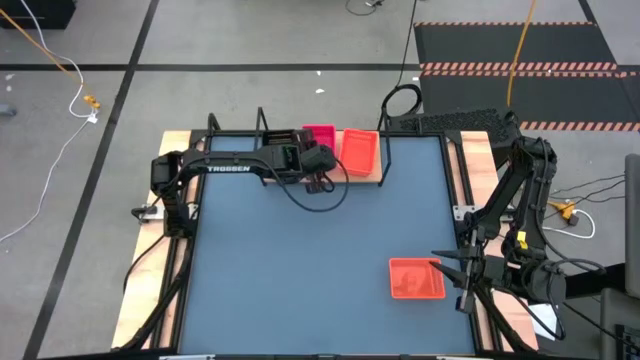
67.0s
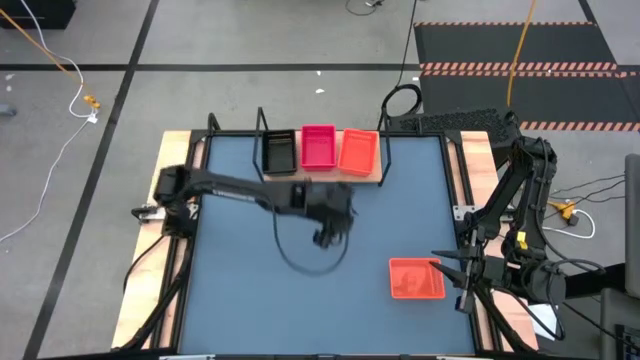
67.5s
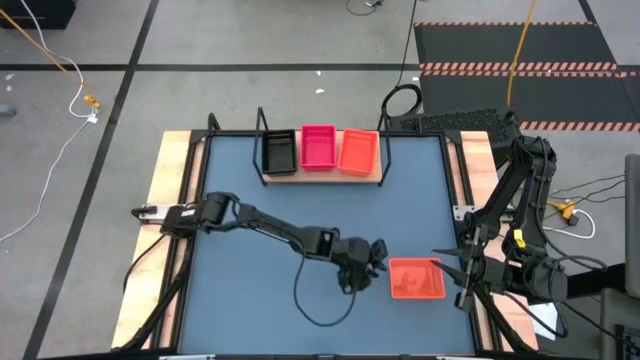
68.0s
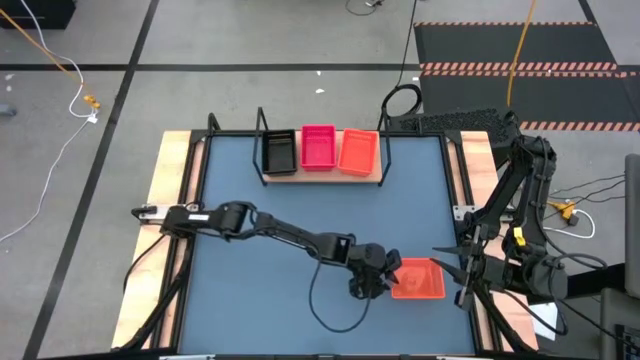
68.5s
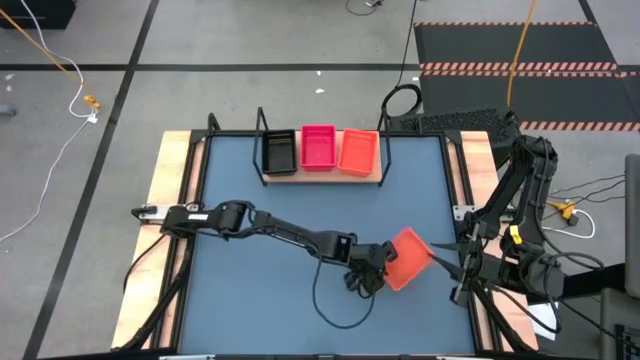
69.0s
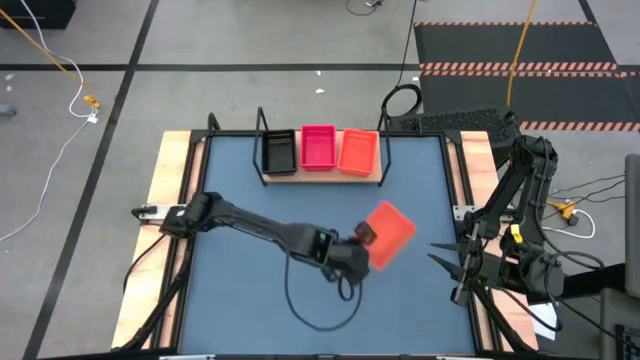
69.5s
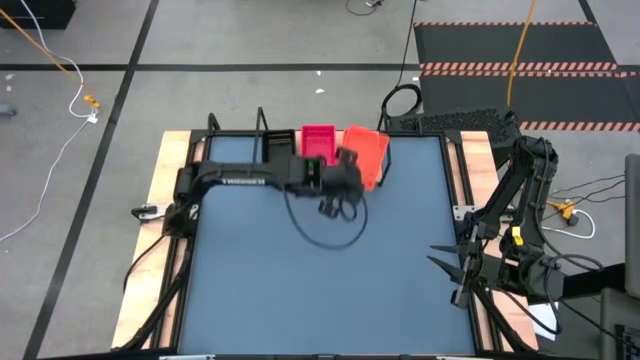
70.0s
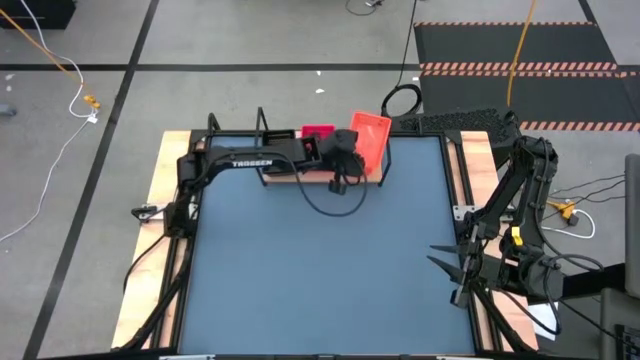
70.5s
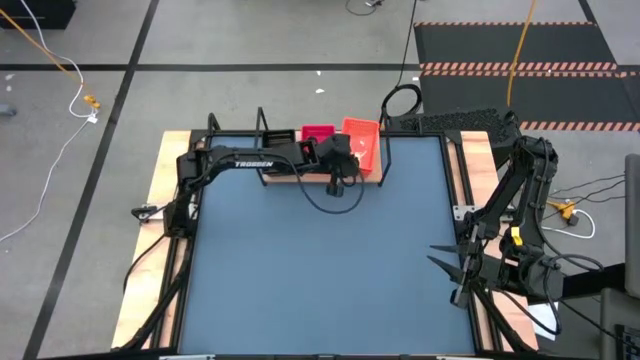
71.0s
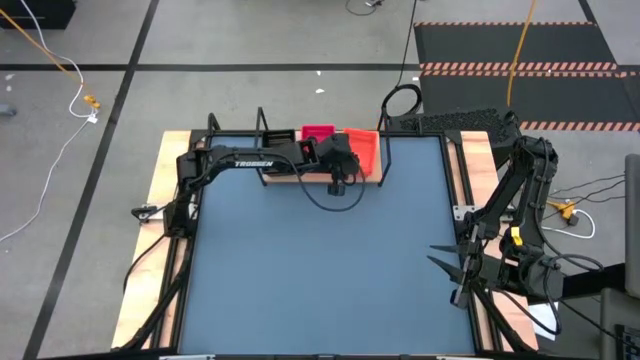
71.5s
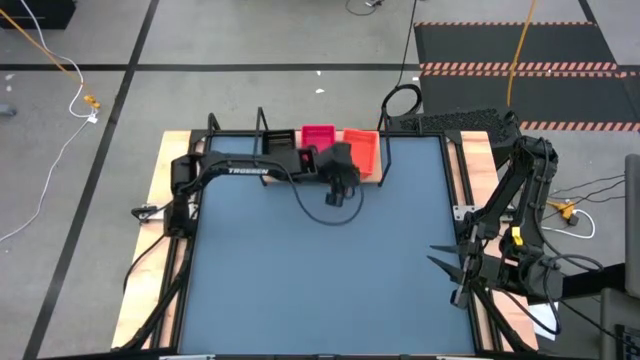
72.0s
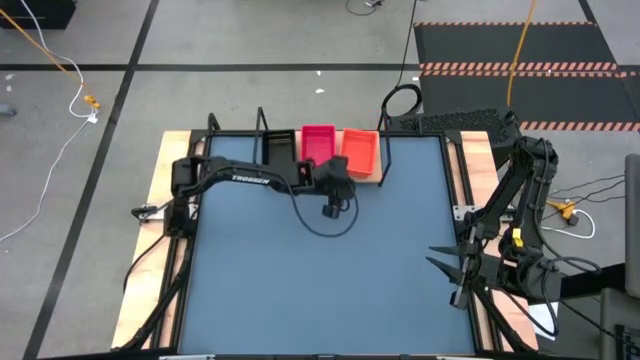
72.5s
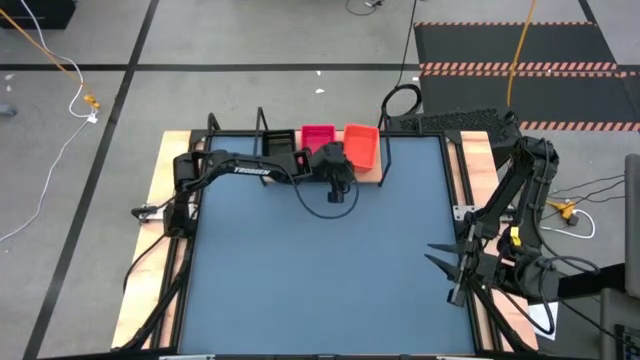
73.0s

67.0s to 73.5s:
Task: Stack baskets on shelf by color
Stack the orange basket on top of the orange basket on the shelf

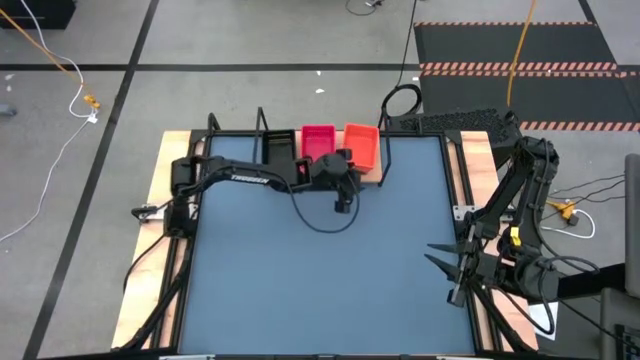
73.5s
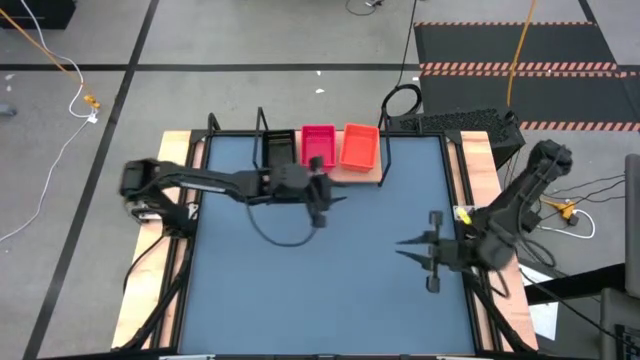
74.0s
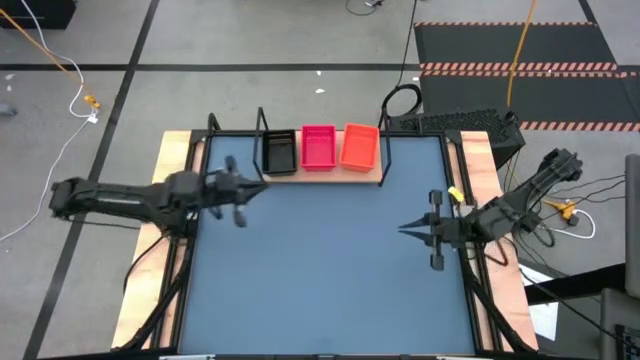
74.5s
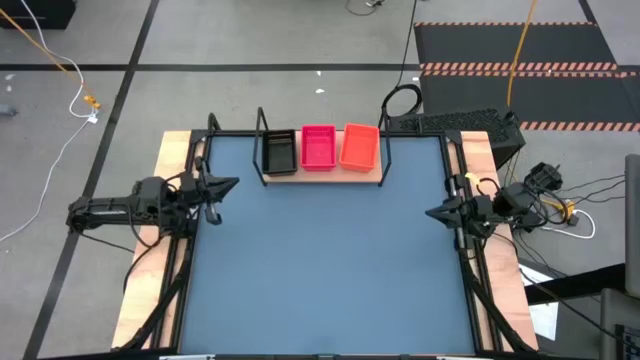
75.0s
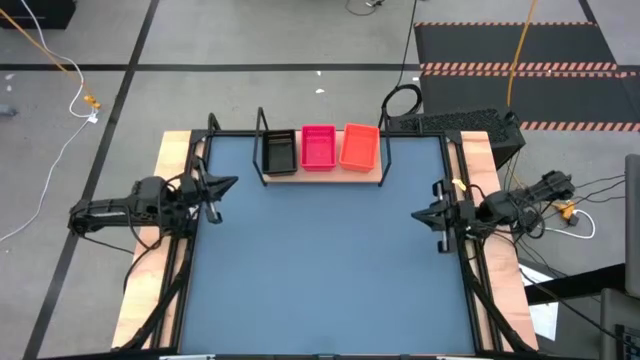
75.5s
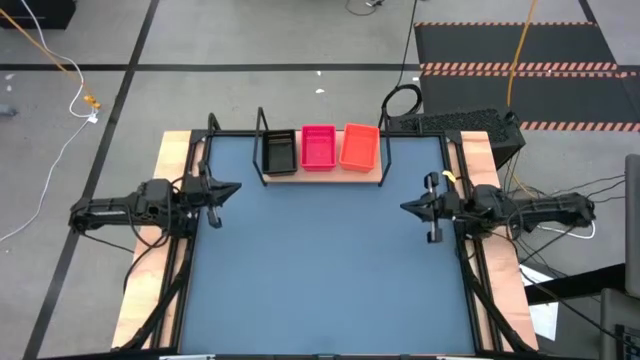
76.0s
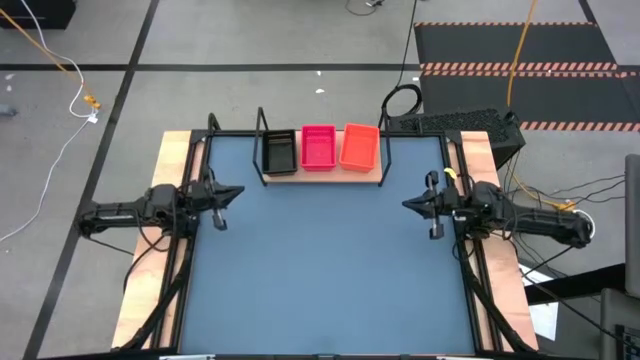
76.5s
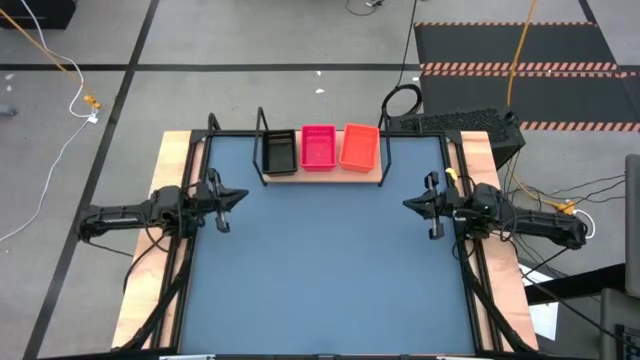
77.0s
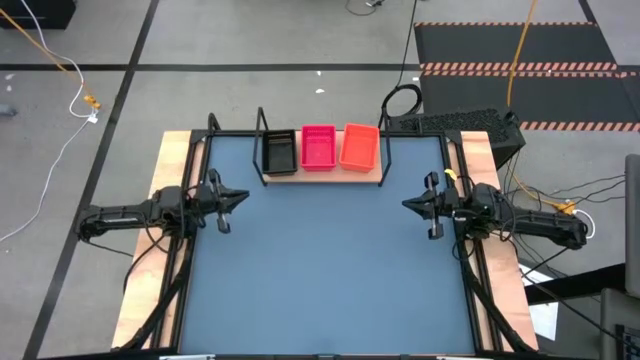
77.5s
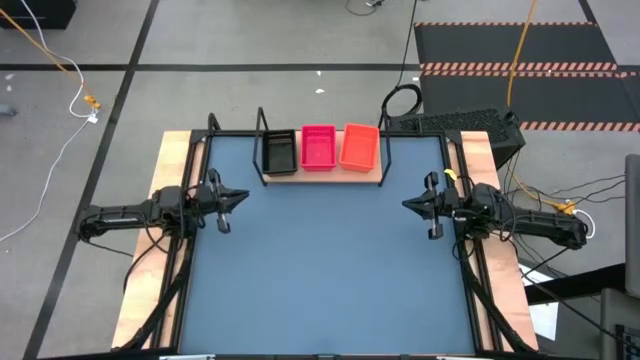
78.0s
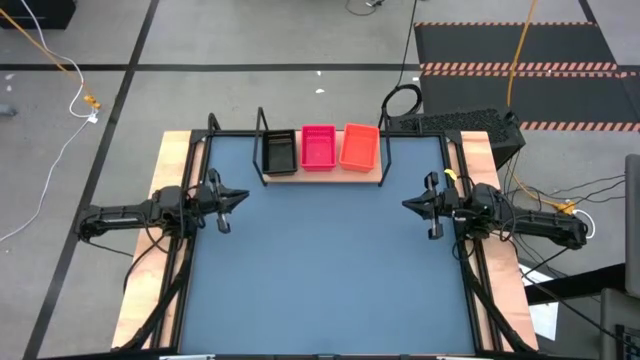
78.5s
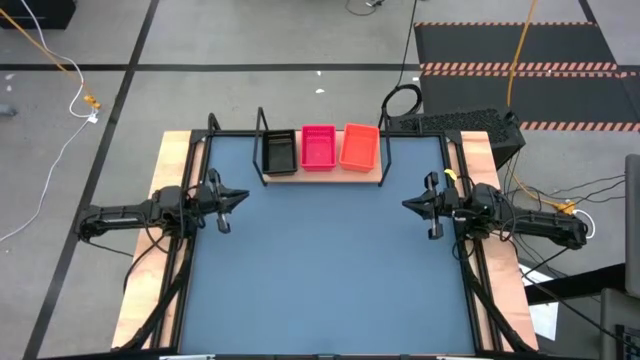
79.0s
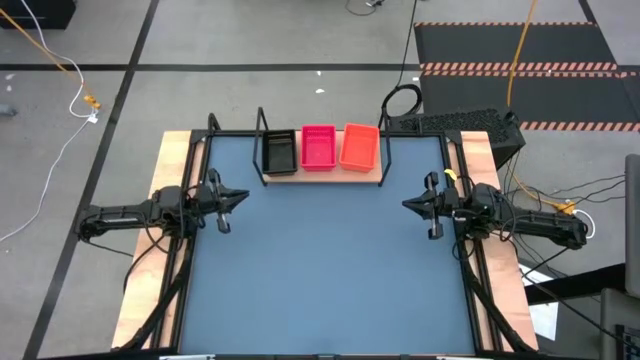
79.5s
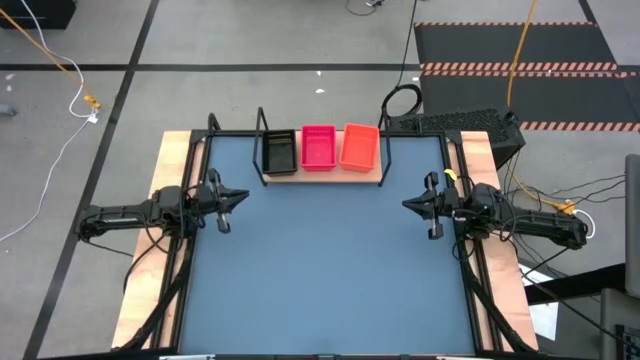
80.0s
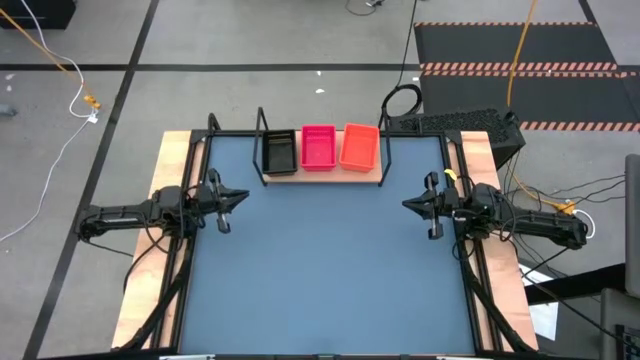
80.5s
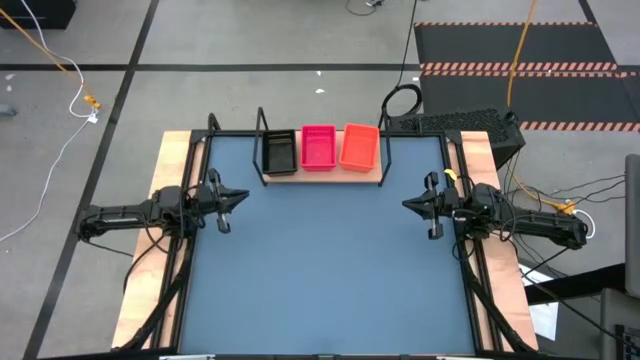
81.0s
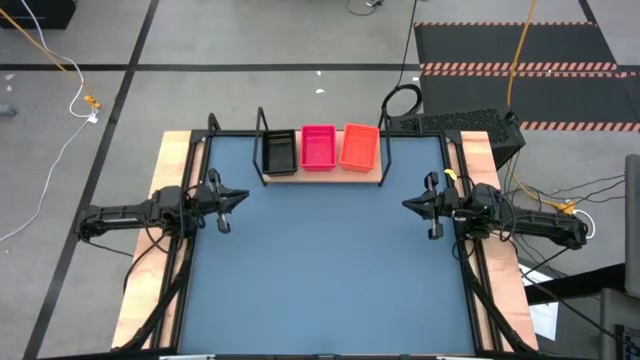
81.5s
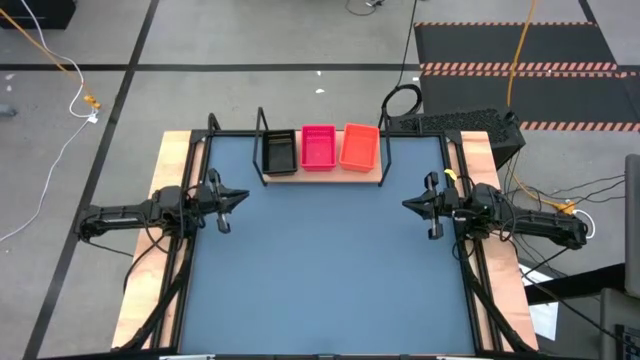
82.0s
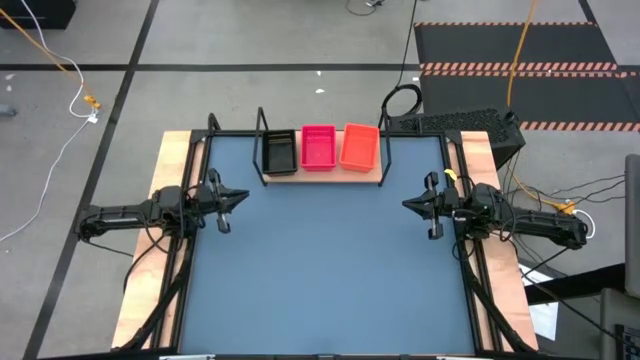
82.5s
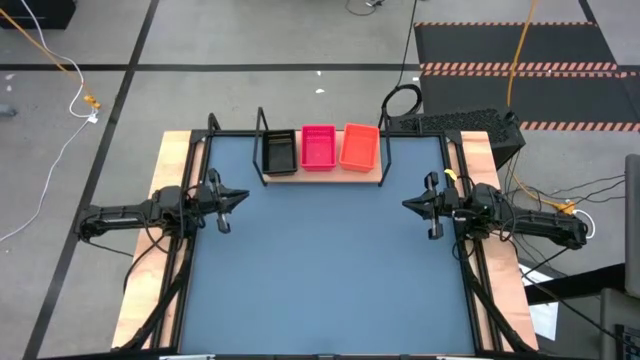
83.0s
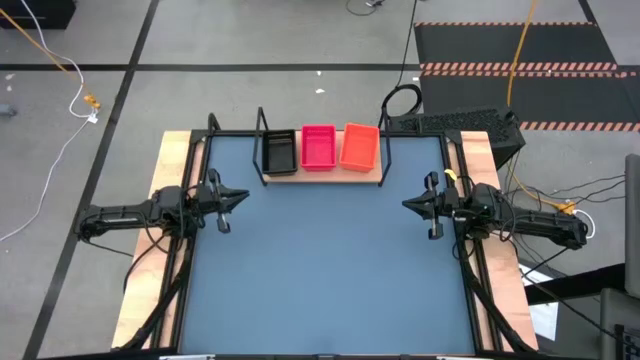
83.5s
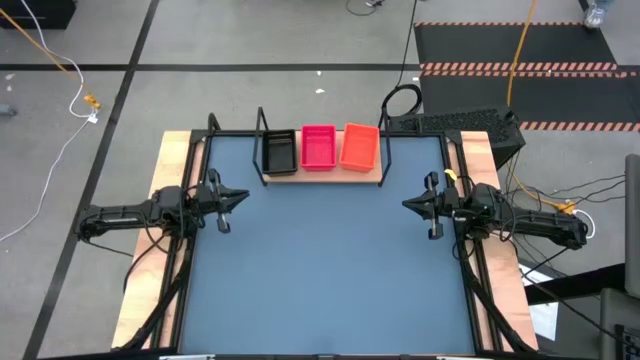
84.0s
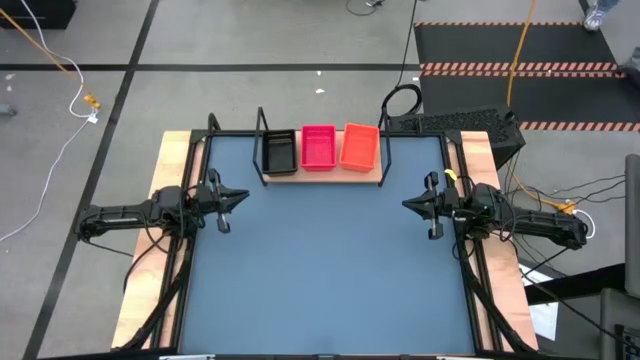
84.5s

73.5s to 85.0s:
Return to Home Position

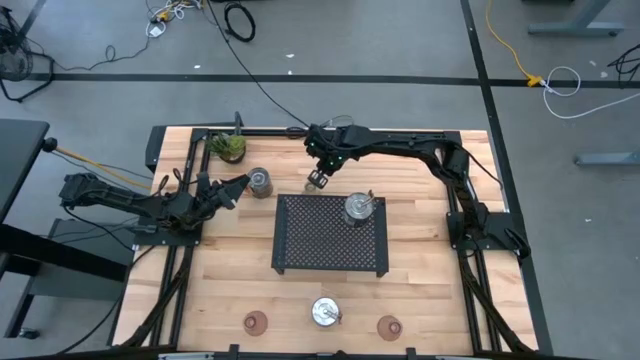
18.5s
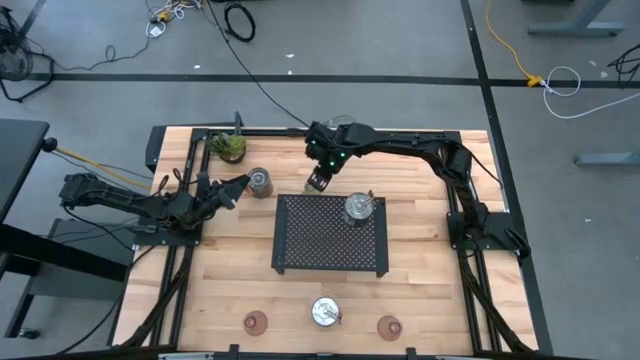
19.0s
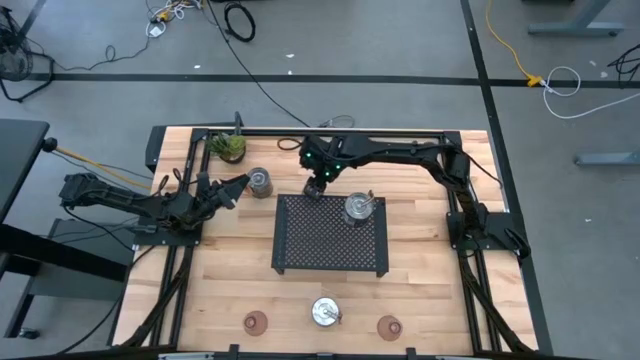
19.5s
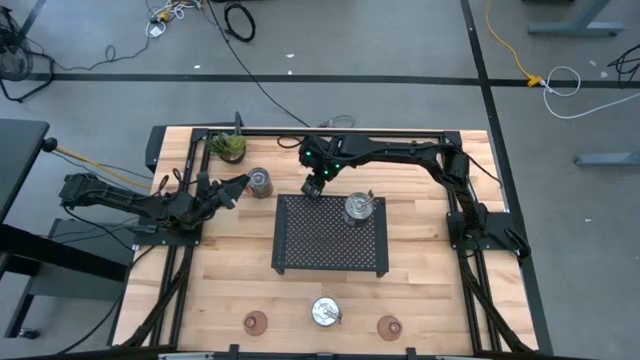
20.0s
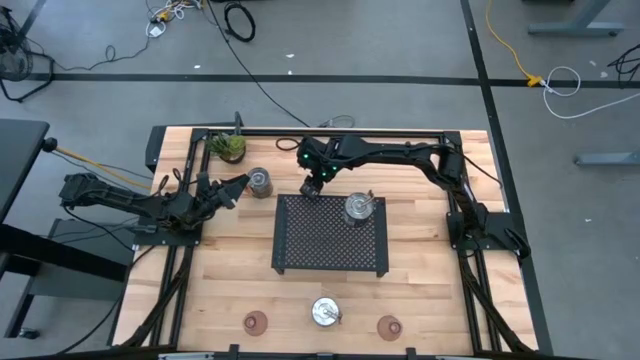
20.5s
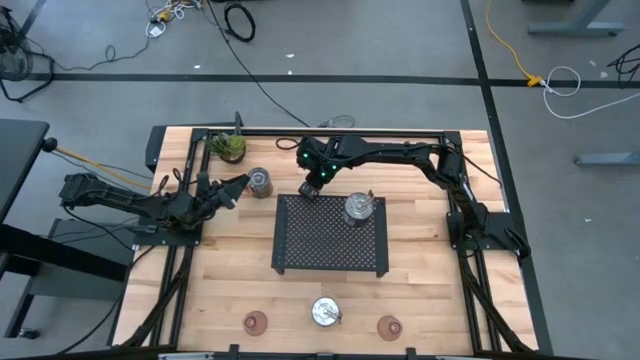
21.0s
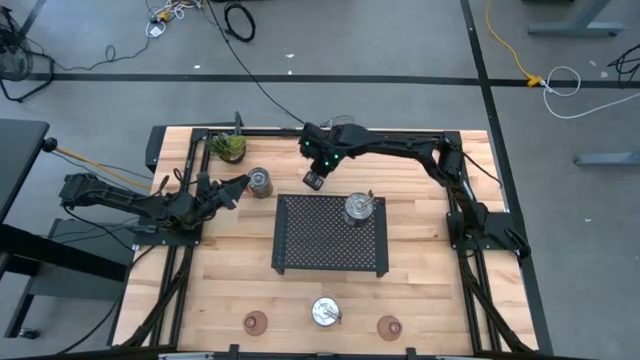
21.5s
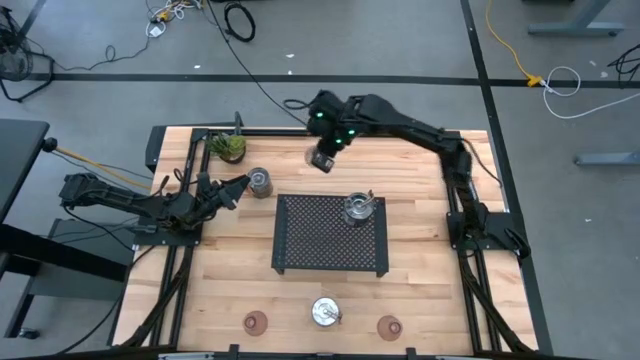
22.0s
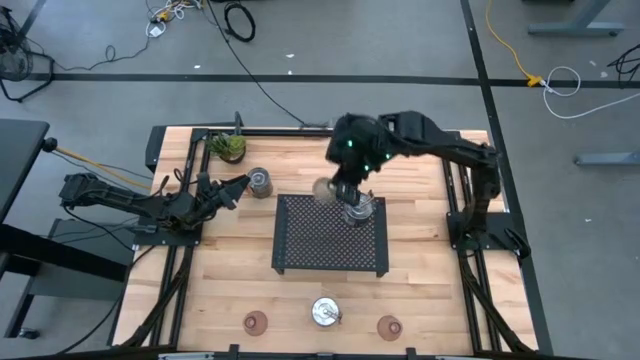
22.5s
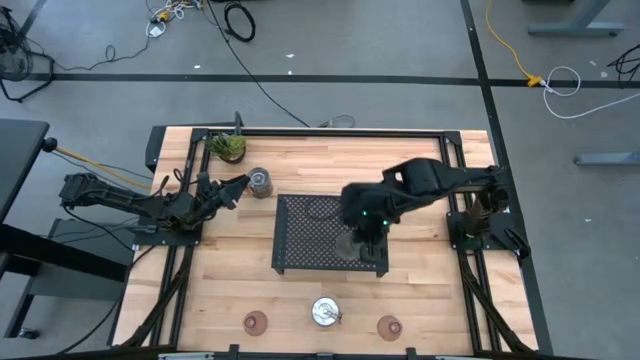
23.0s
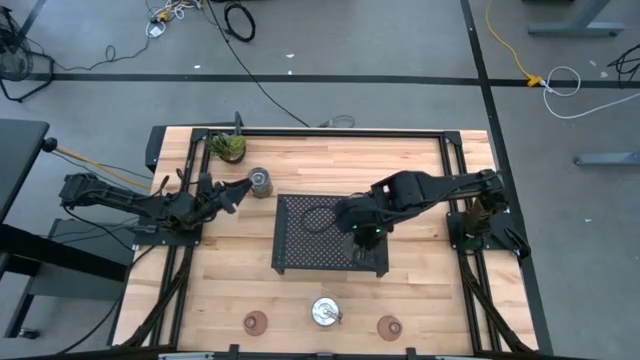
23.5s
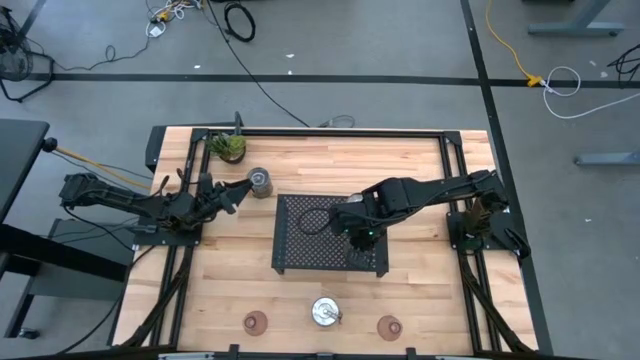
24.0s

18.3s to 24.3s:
Task: Pick & Place candle stick holders
Put the green candle holder on the shelf
